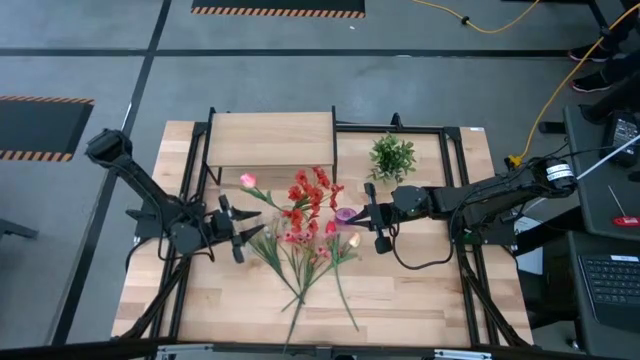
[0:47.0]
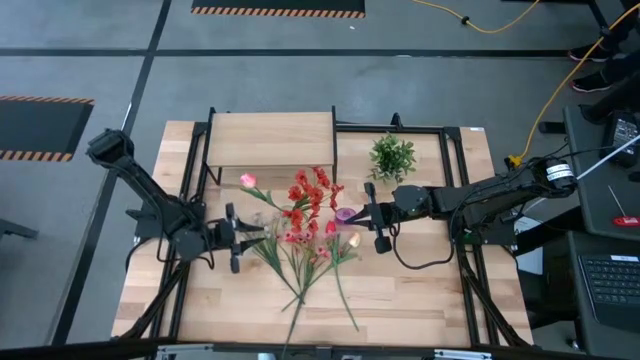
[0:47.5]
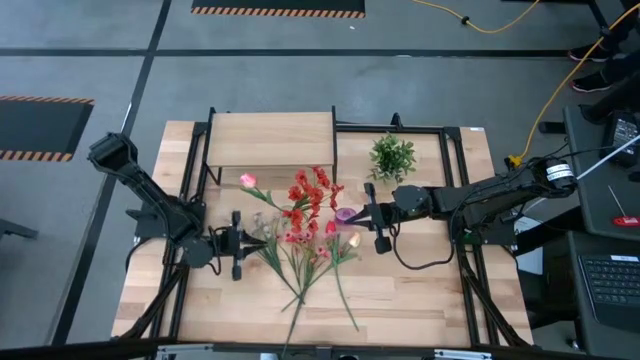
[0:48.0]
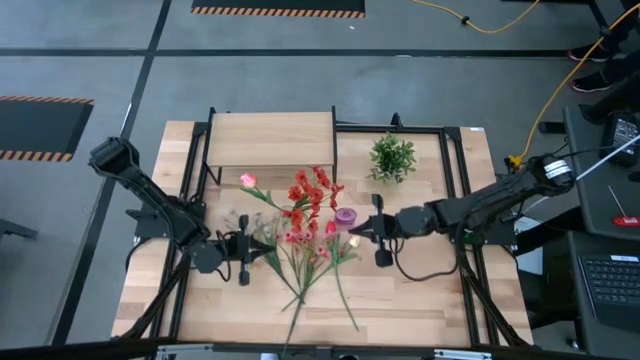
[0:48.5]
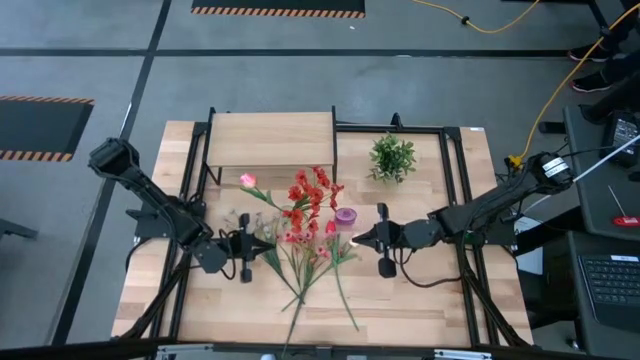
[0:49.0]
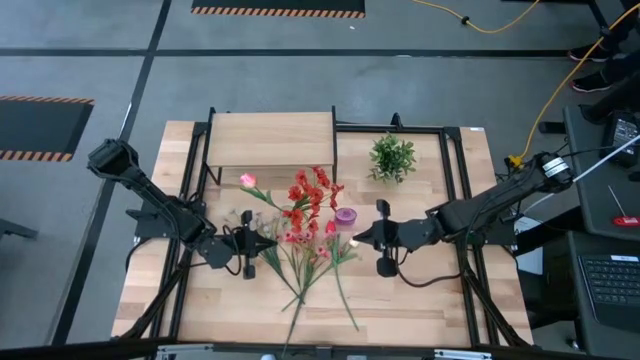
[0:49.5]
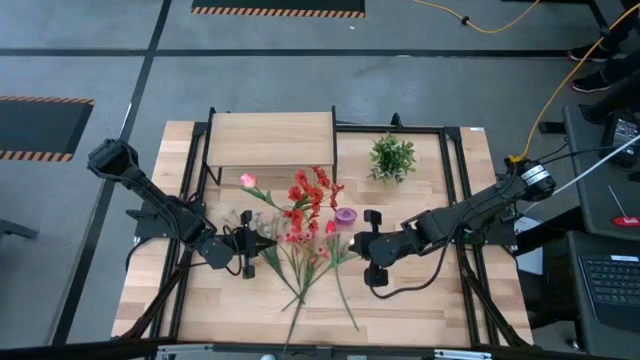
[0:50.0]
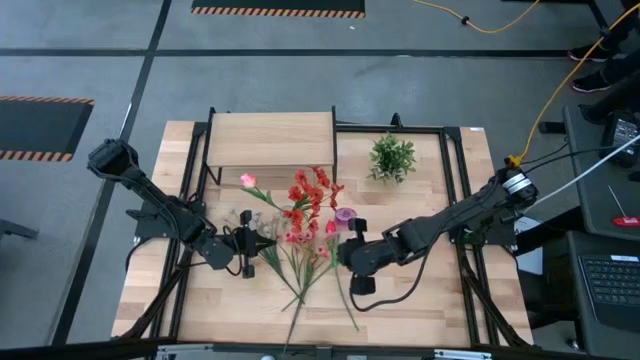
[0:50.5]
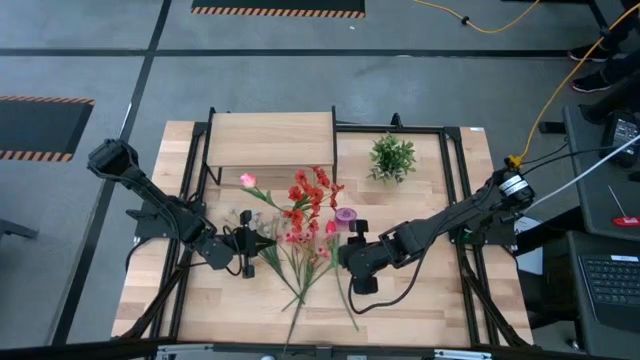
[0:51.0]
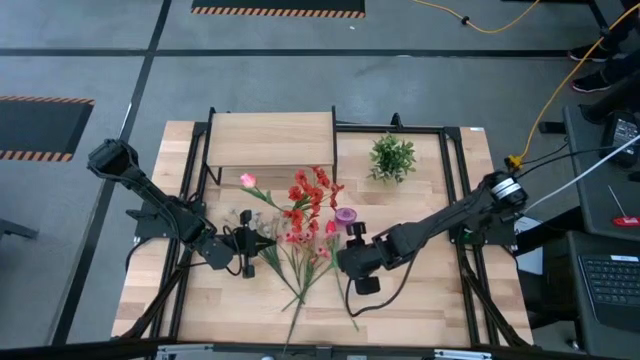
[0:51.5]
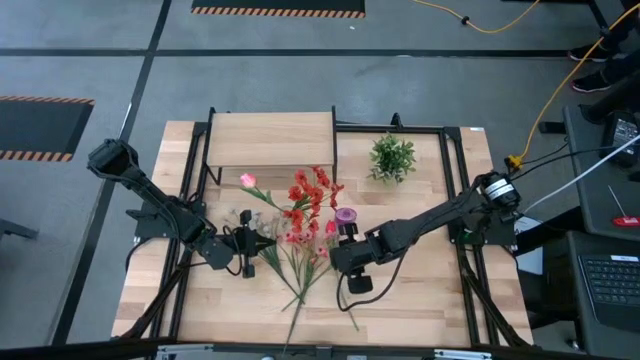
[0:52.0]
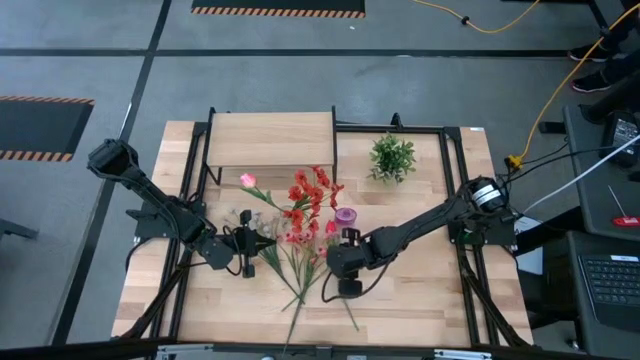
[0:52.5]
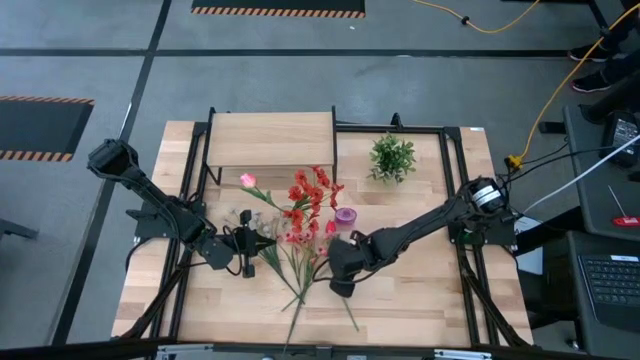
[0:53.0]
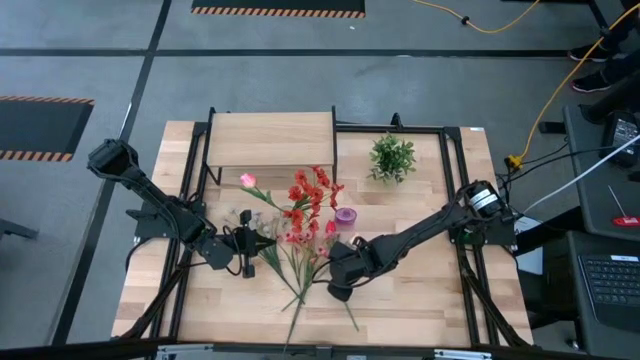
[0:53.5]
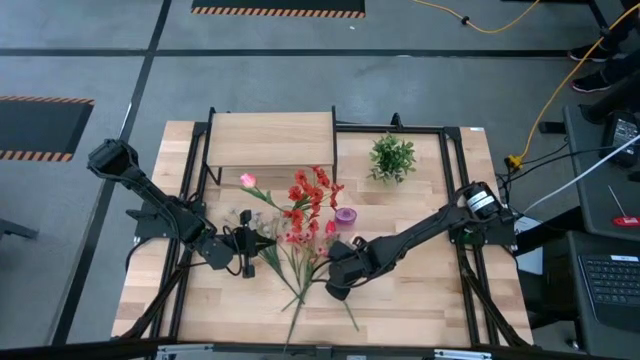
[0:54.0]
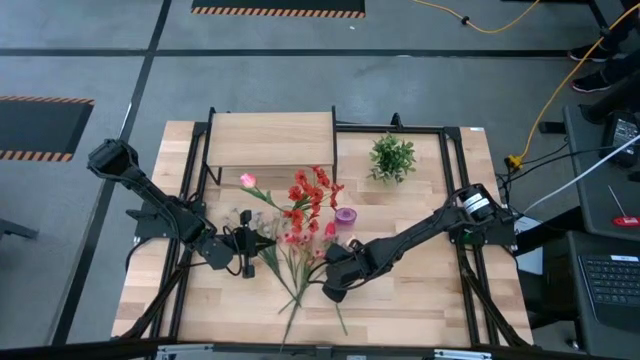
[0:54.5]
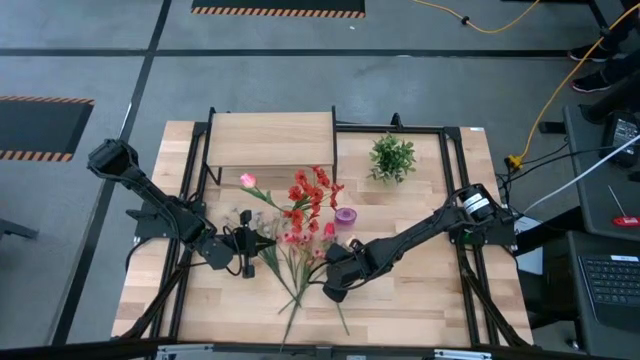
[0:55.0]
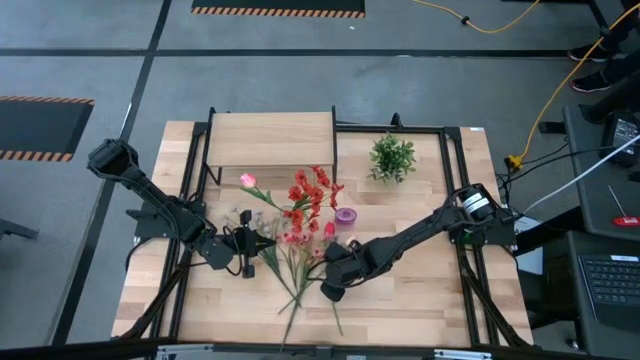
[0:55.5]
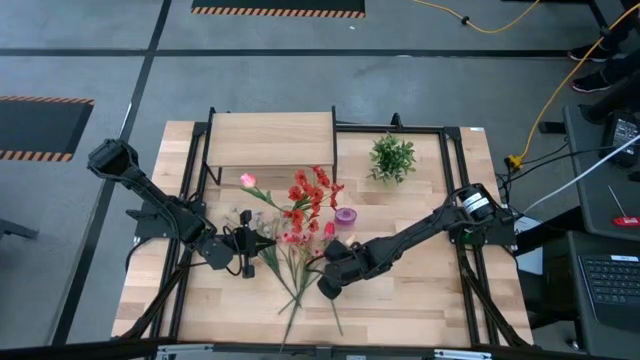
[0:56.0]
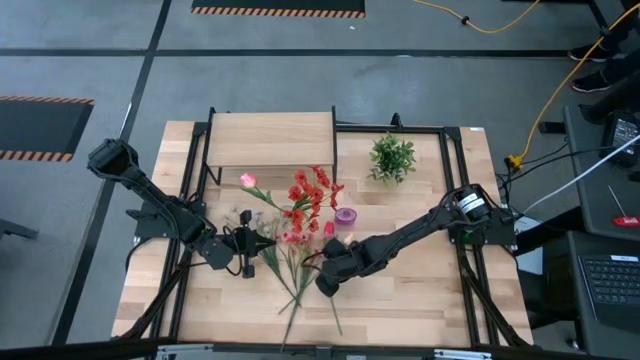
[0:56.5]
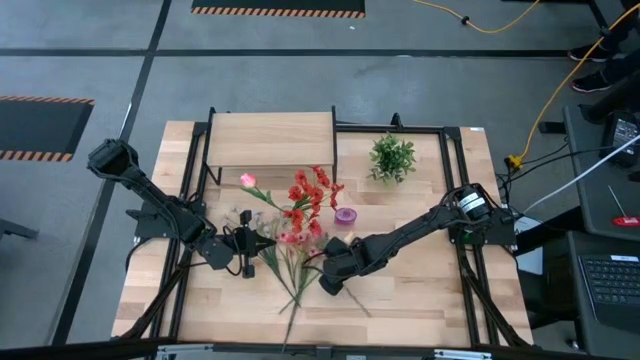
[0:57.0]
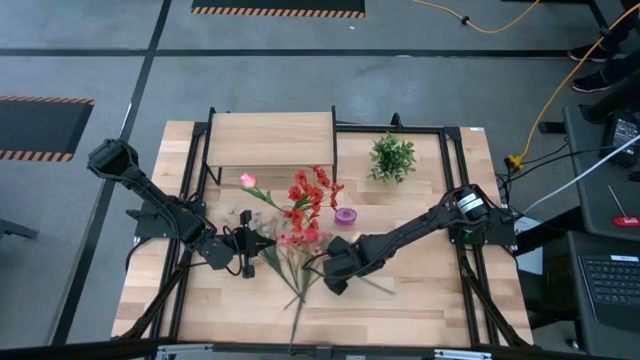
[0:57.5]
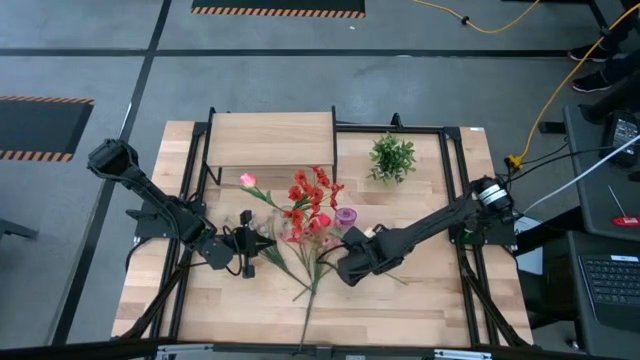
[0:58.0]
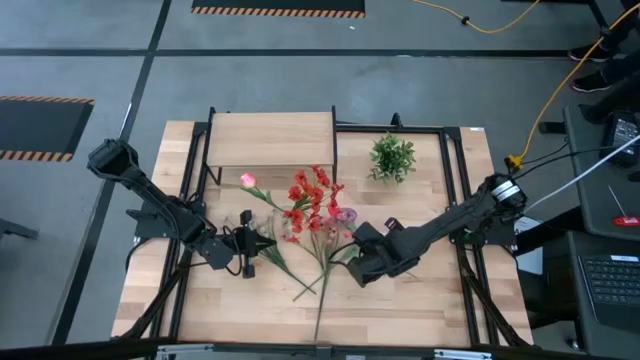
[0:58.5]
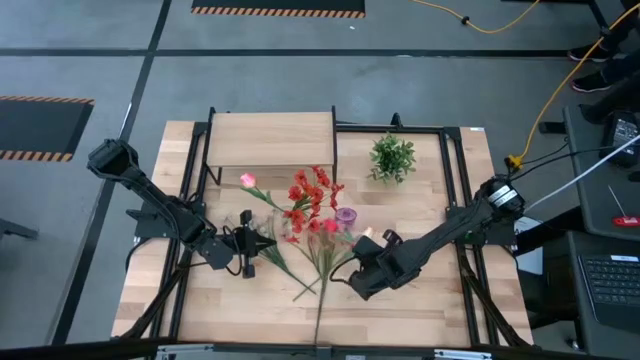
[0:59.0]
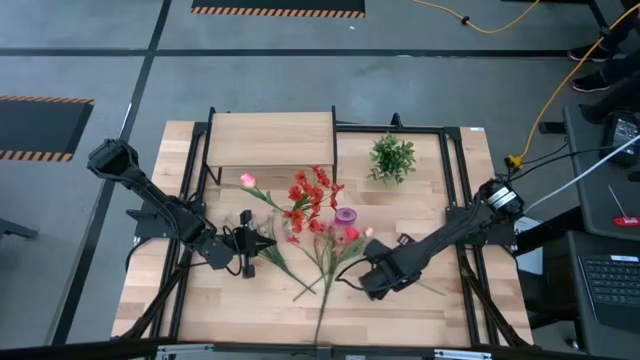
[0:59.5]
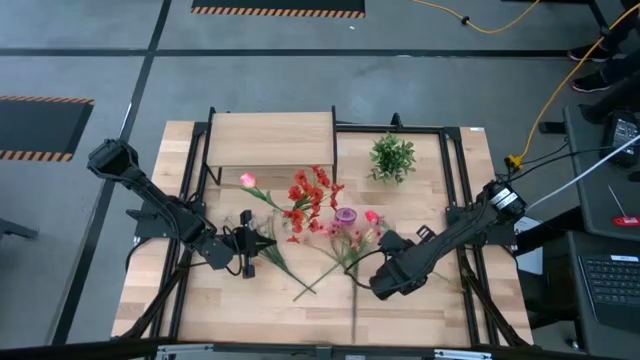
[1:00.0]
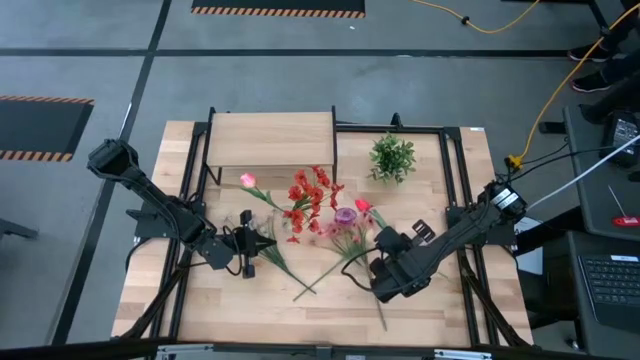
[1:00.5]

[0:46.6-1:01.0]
Task: Pick and place flowers into a vace then onto a shelf
Put the red tulip into the transparent vase

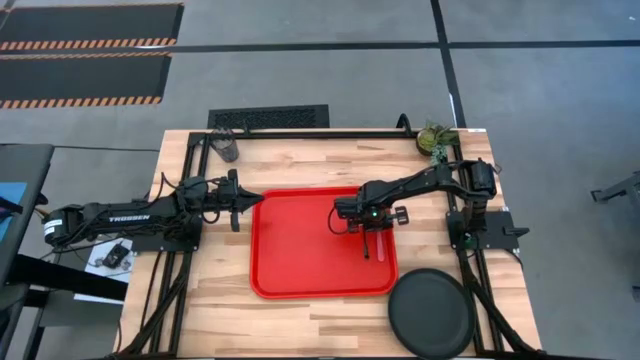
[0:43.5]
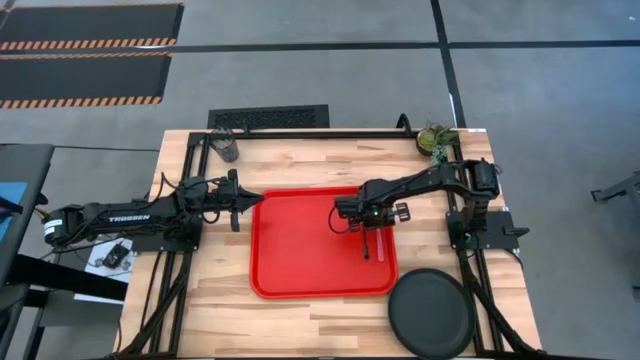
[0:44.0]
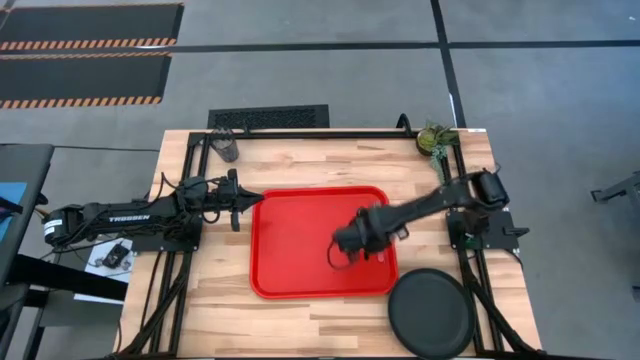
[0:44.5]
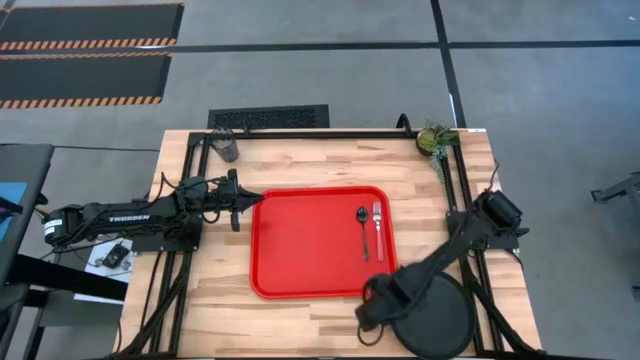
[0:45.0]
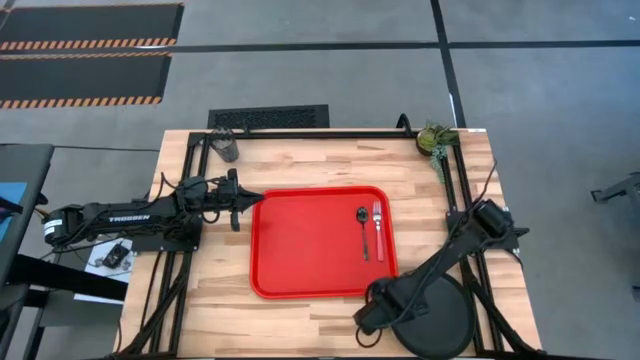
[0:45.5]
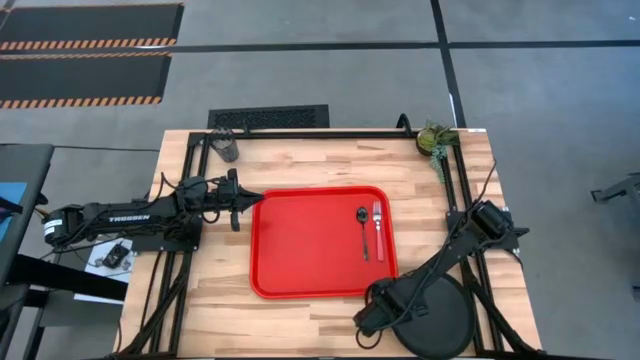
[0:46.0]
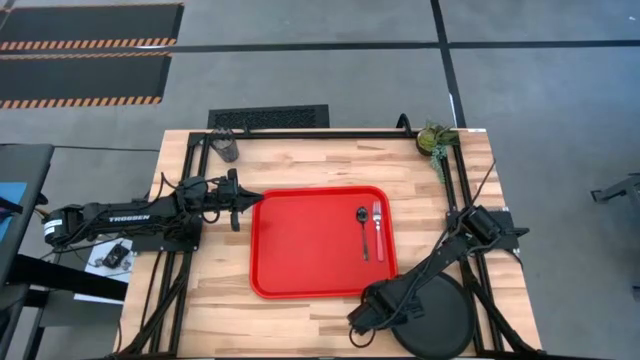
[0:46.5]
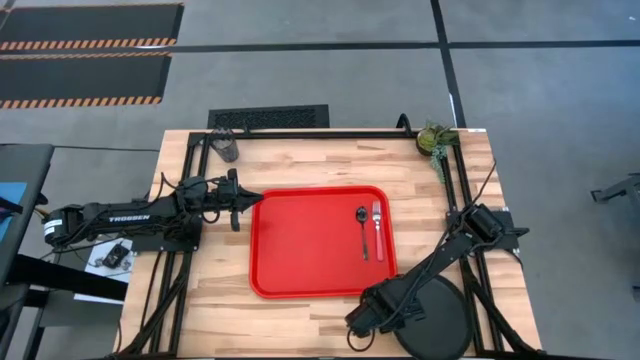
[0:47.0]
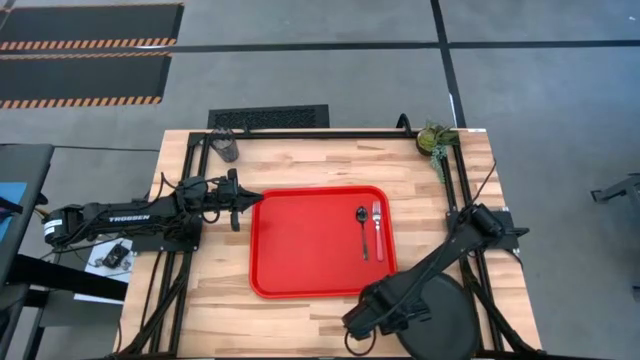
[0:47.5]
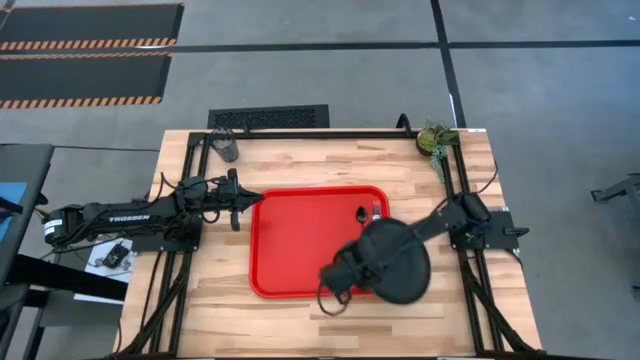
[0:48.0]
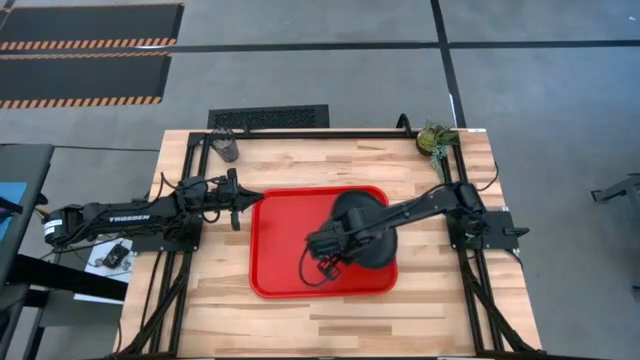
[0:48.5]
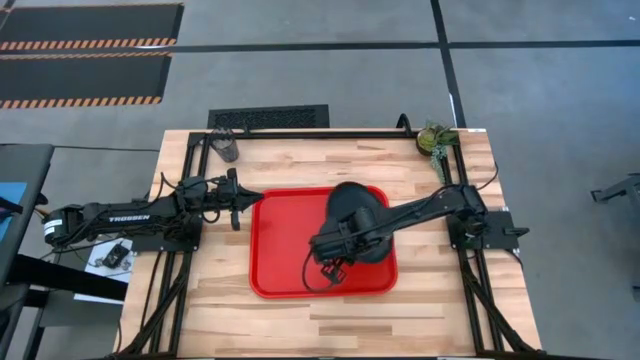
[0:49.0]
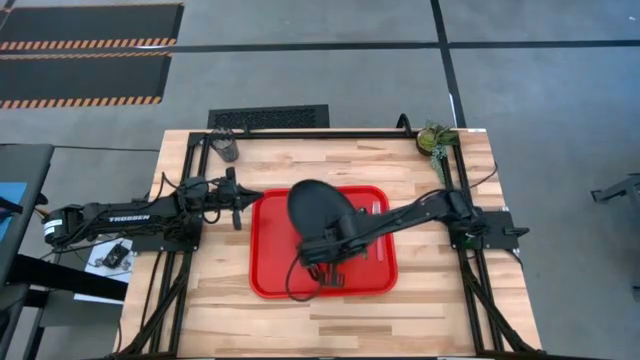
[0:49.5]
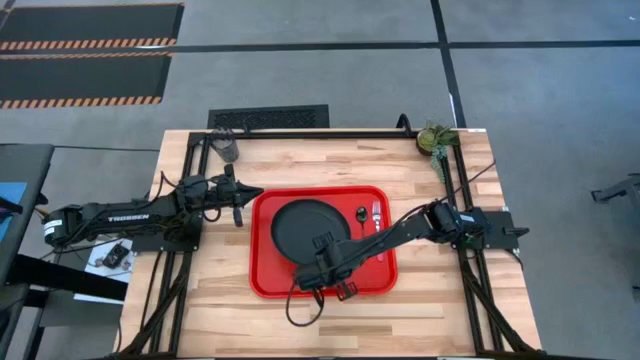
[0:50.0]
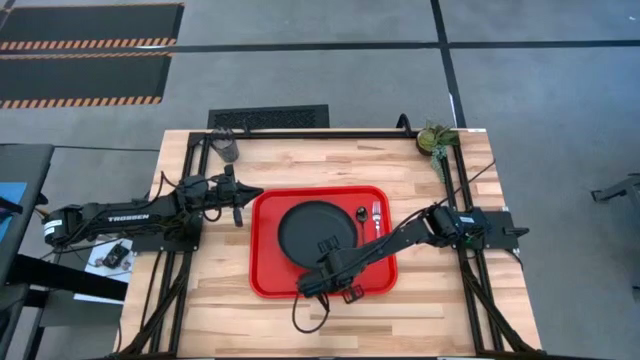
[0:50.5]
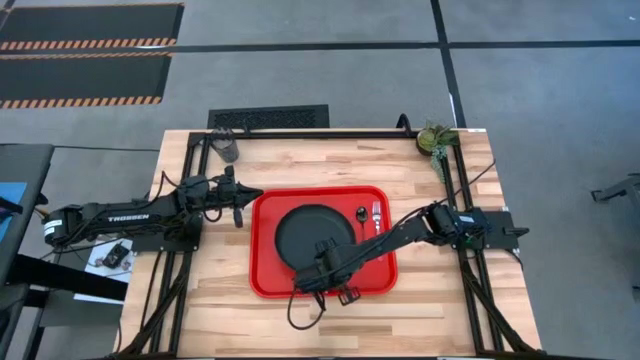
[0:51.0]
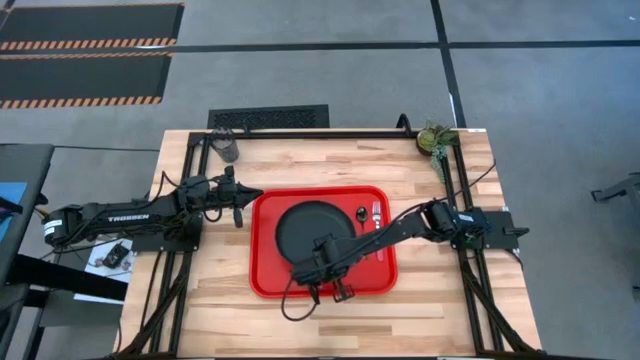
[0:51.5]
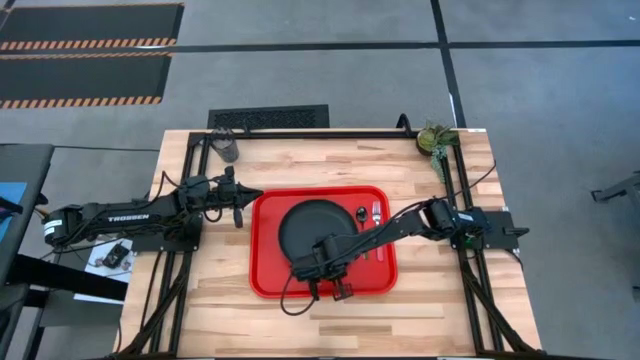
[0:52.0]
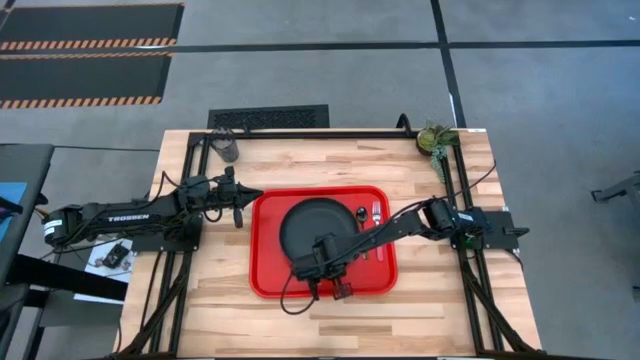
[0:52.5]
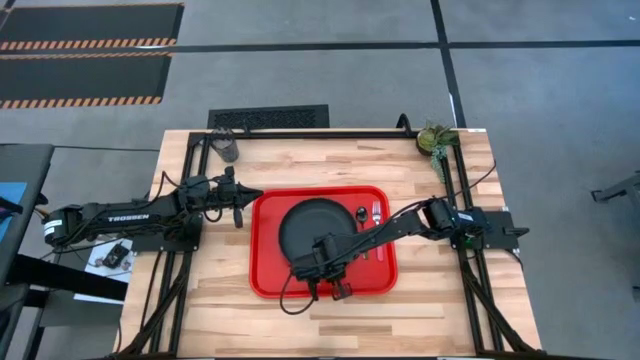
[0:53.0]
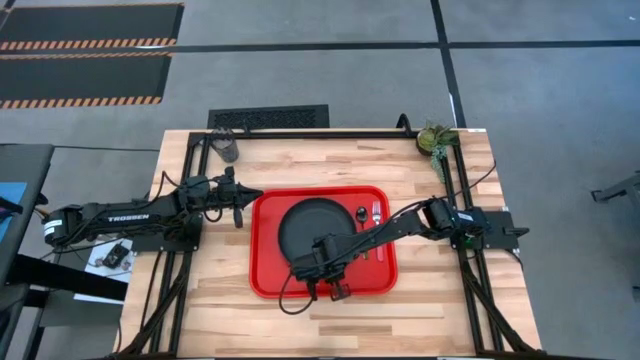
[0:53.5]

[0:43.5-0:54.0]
Task: Pick and place plate/cup/fork/spoon on tray
Put the black plate to the left of the black spoon on the red tray
